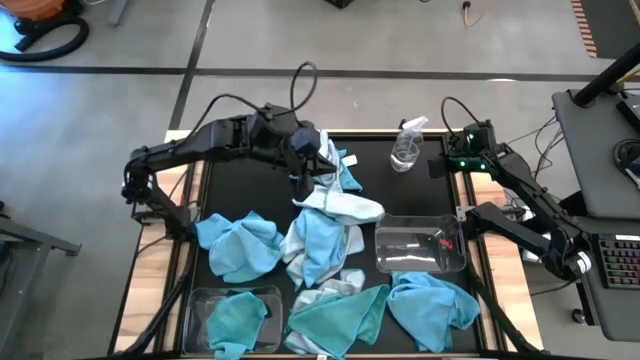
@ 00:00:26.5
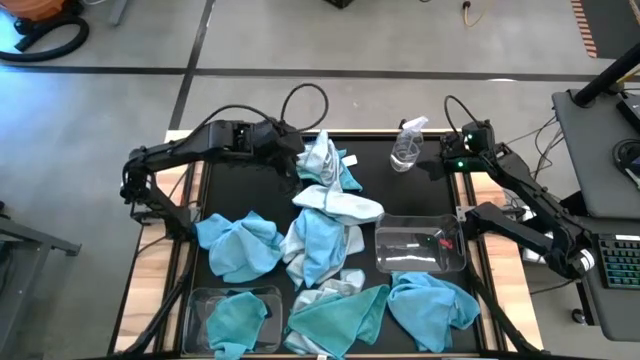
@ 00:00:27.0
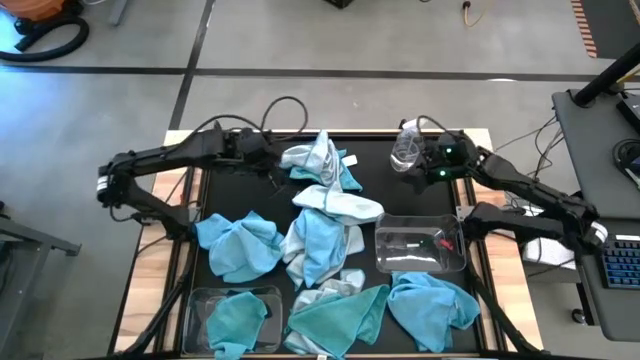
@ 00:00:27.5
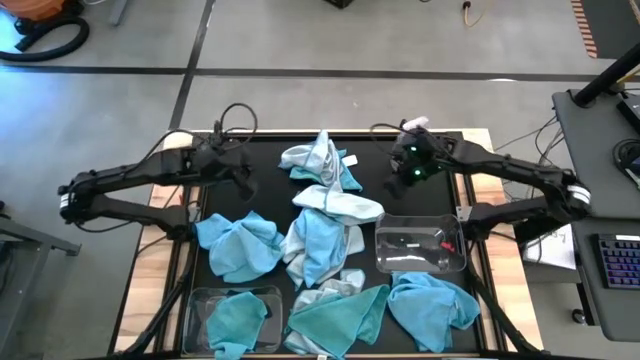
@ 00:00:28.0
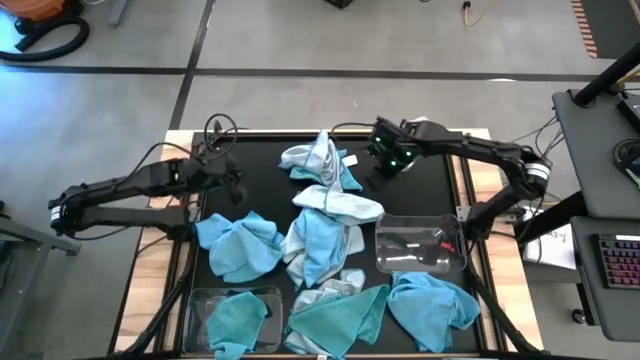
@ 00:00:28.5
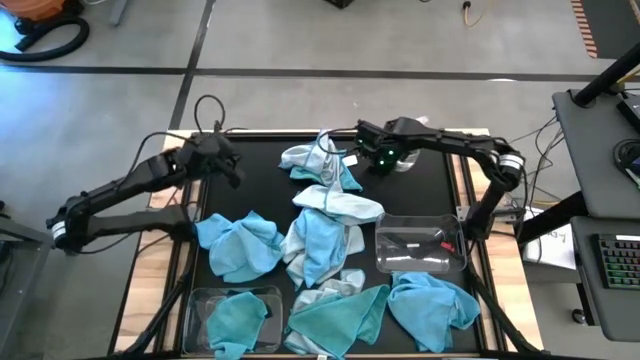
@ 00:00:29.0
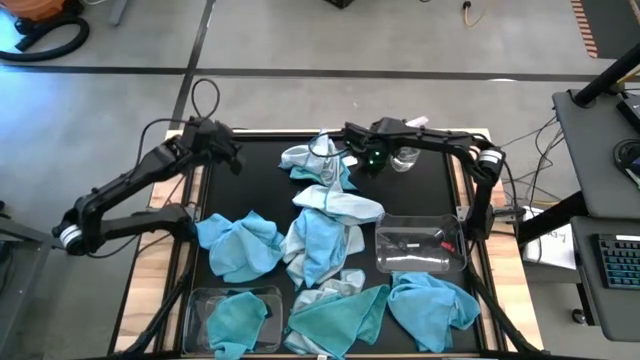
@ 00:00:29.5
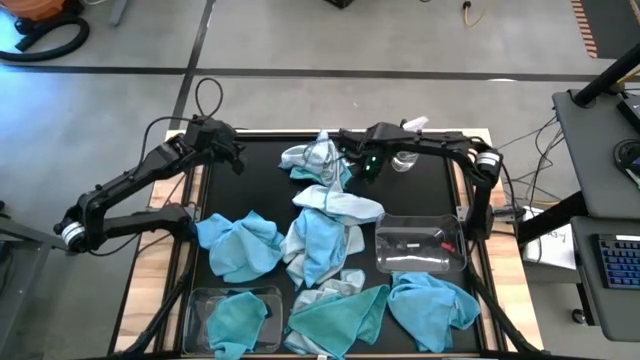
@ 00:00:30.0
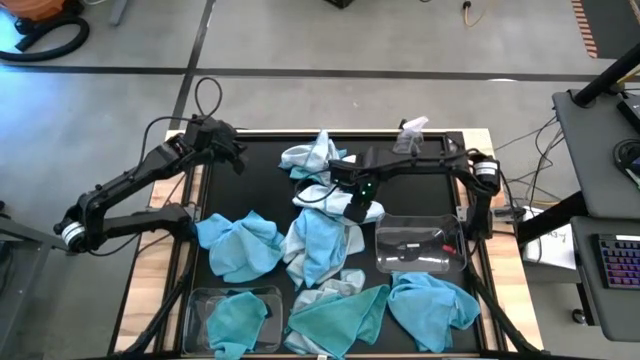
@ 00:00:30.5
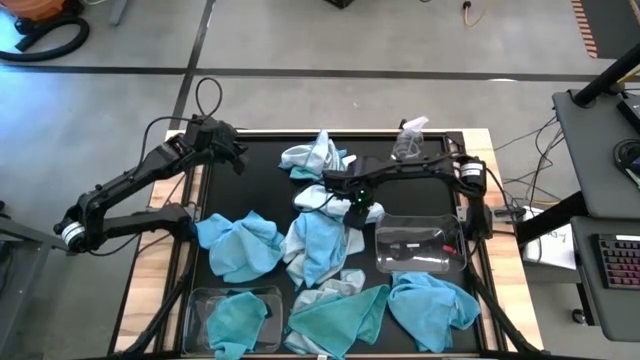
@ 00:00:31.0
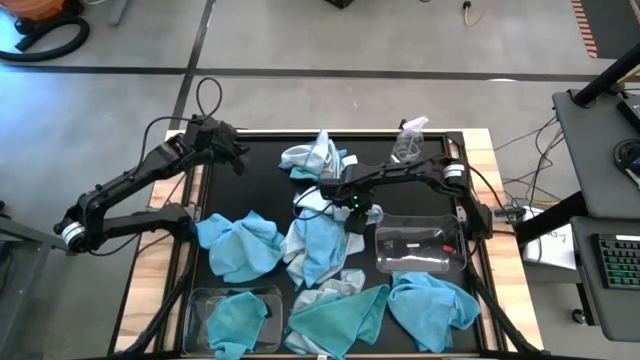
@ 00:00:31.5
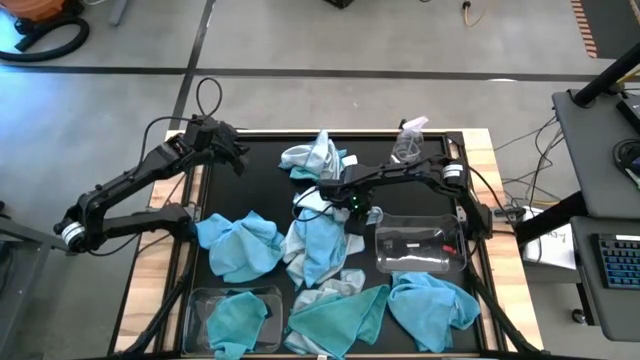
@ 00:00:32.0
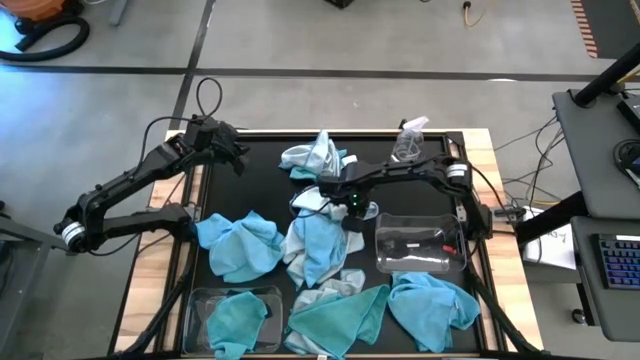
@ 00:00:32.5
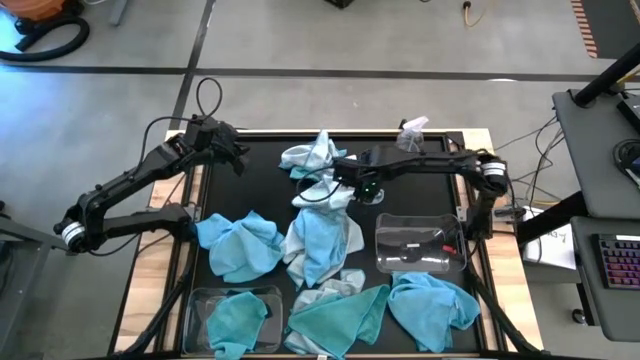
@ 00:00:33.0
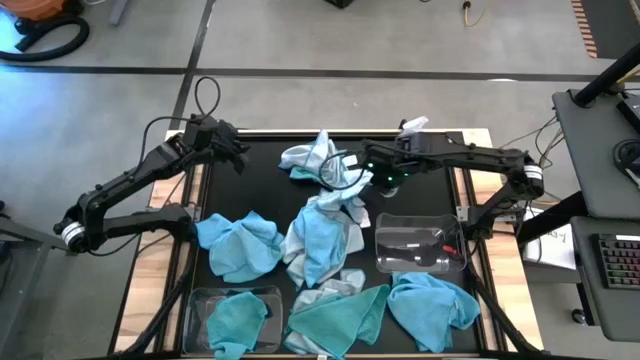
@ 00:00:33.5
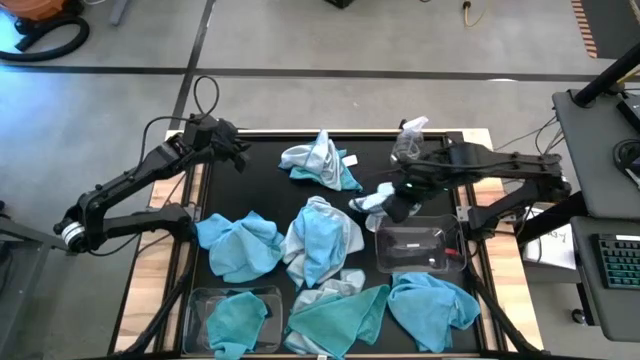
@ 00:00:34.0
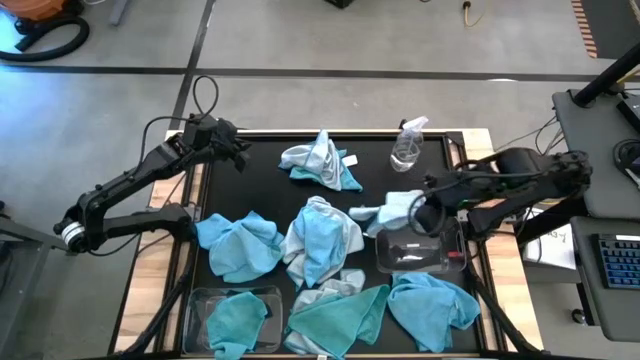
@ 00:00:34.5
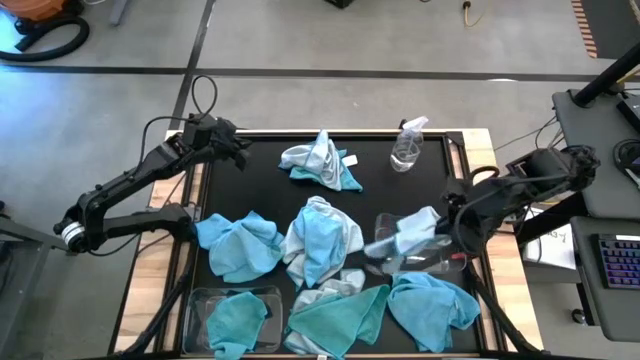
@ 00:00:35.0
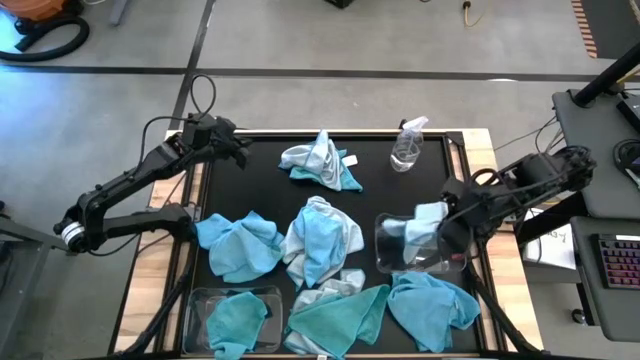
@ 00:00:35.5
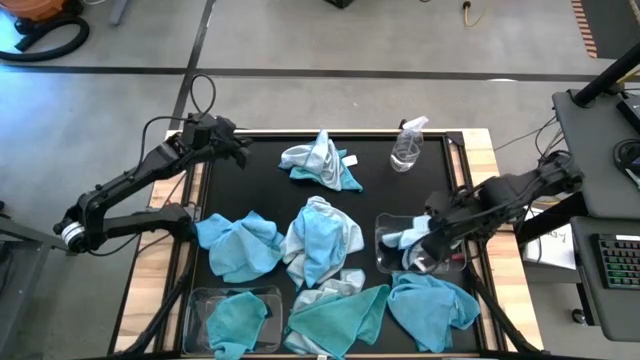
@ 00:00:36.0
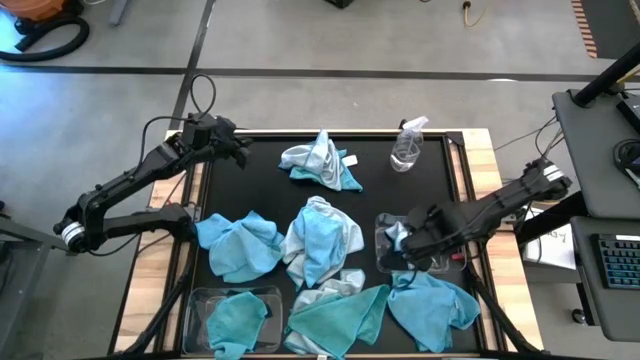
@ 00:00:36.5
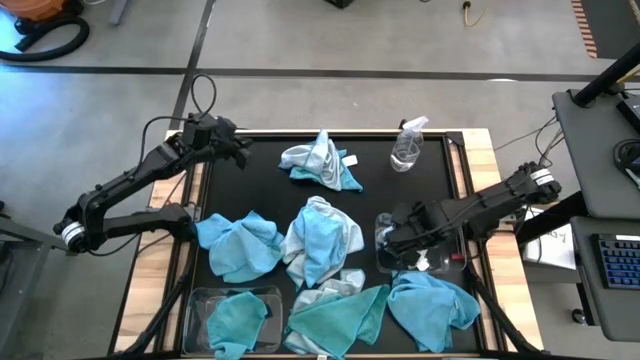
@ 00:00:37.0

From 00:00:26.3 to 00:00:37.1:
Task: Sort microfiber towel by color & place in baskets
Put the white towel into the top transparent bin

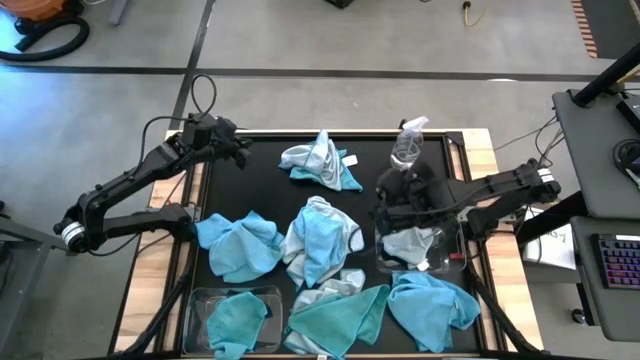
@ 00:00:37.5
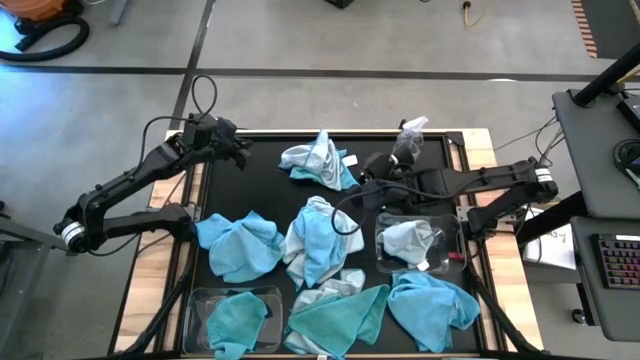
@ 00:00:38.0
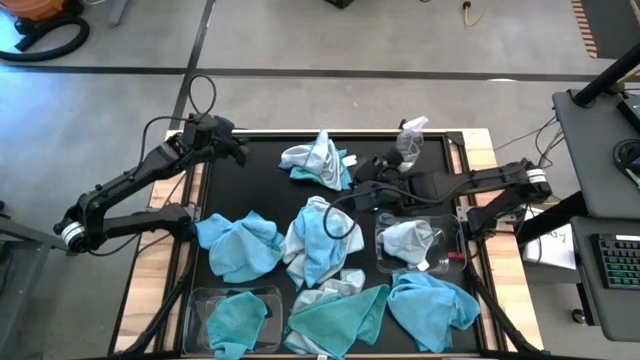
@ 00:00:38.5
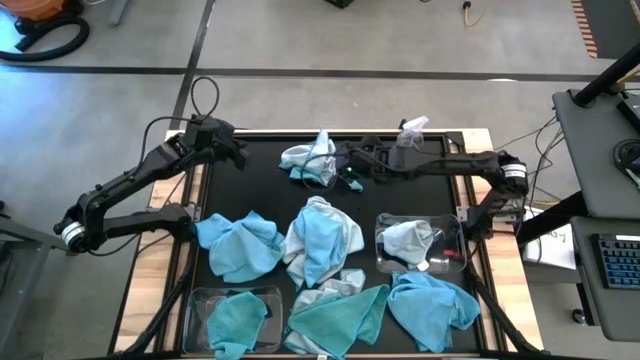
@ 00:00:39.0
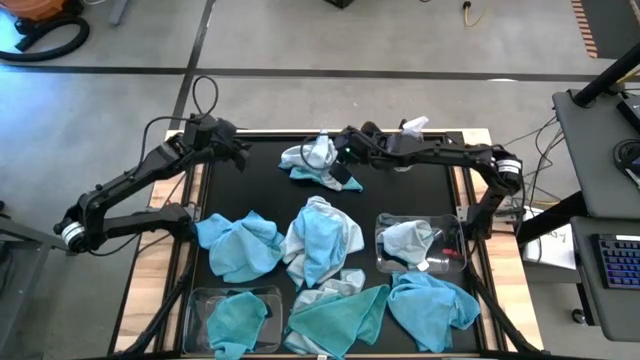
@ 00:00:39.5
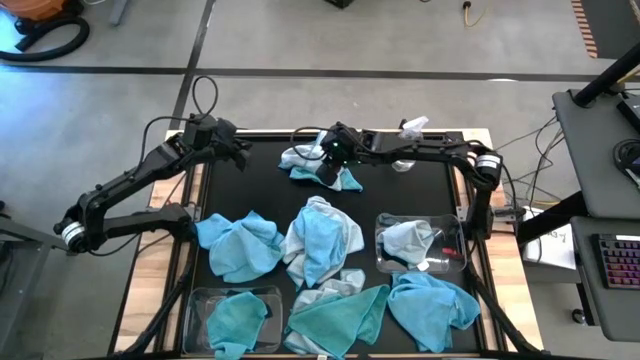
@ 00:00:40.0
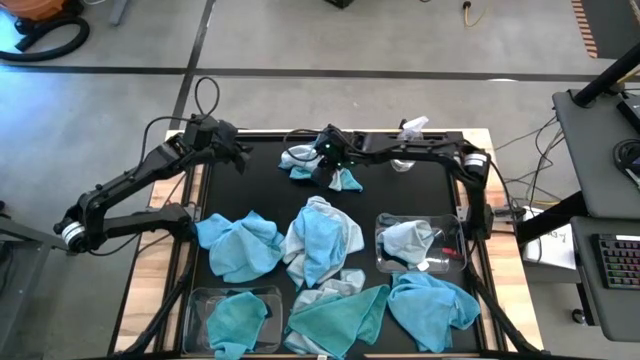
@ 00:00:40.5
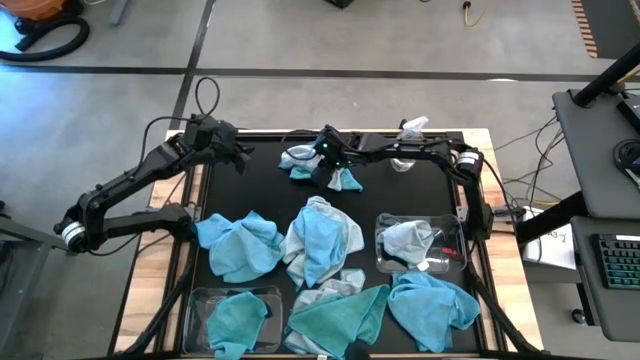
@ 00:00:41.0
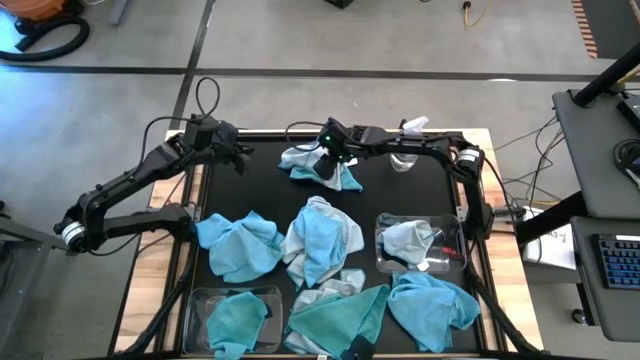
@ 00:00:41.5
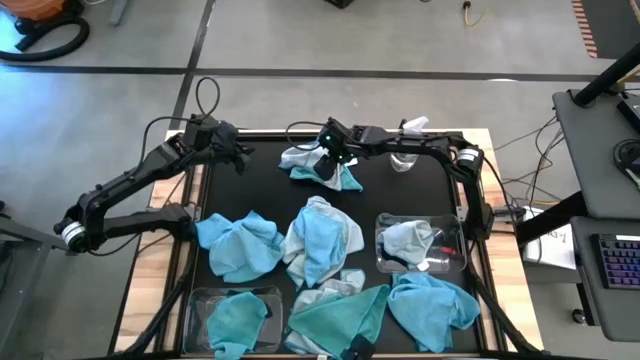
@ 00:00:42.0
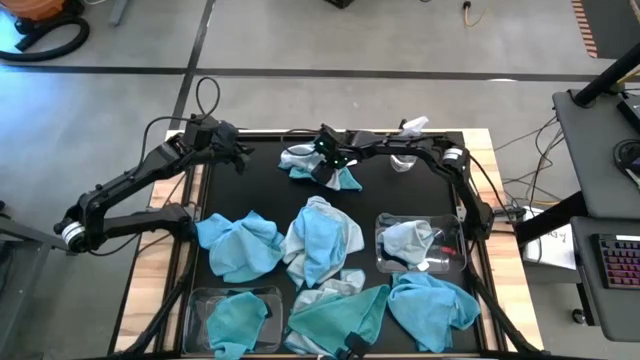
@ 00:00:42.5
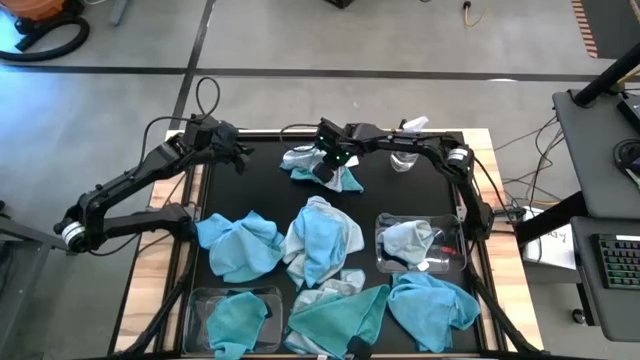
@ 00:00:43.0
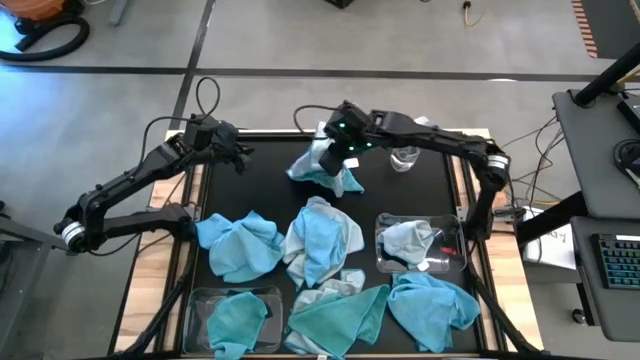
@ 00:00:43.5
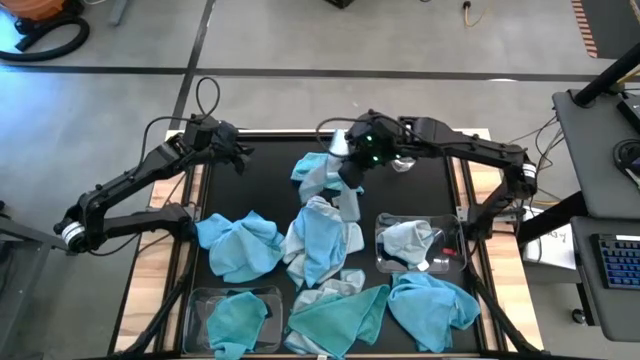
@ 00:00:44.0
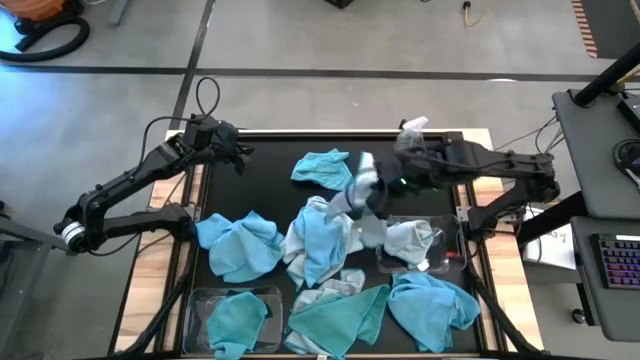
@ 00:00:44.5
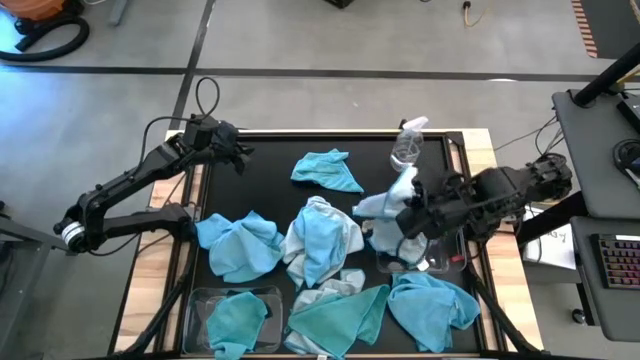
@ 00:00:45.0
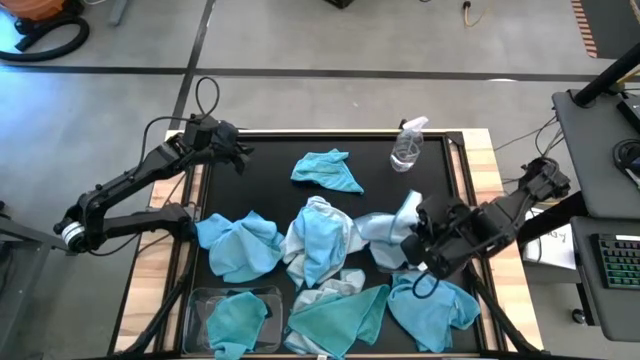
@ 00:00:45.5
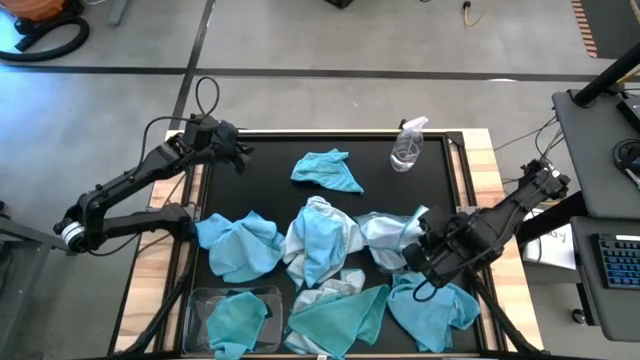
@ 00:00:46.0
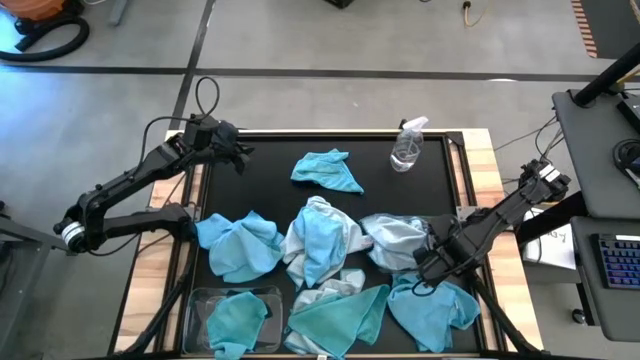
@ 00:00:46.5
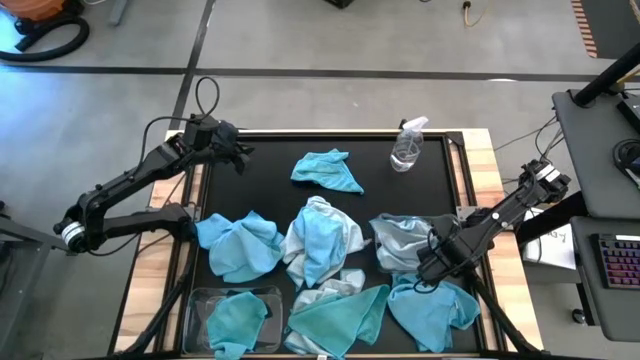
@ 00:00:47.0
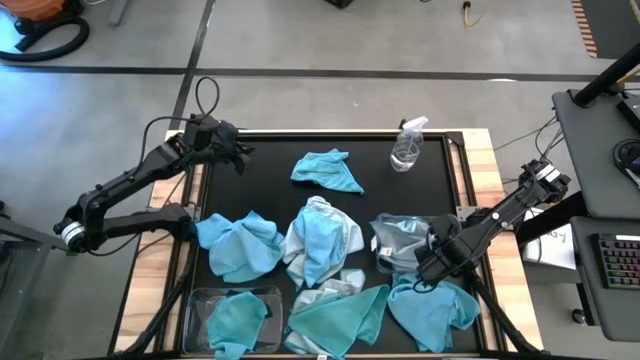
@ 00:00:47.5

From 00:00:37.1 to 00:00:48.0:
Put the white towel into the top transparent bin
